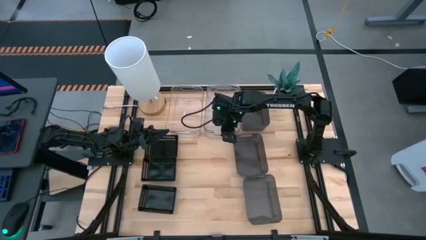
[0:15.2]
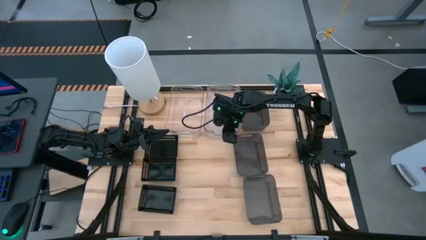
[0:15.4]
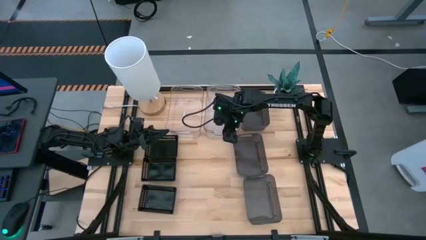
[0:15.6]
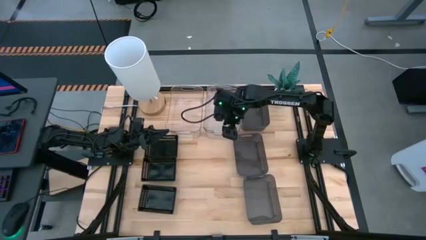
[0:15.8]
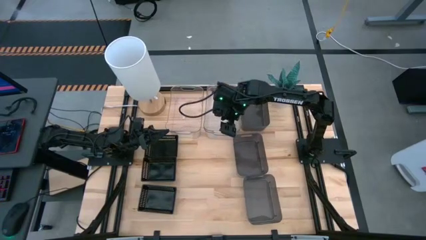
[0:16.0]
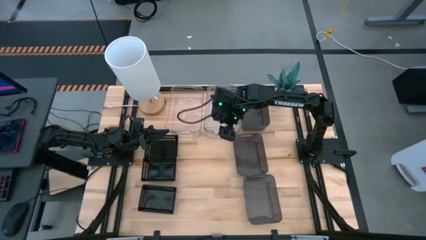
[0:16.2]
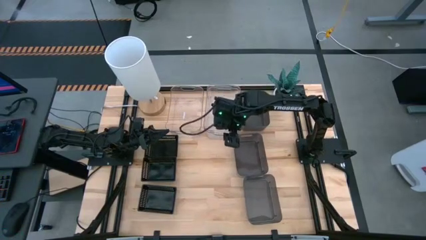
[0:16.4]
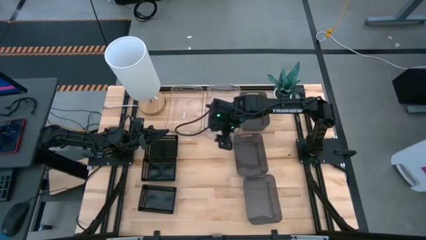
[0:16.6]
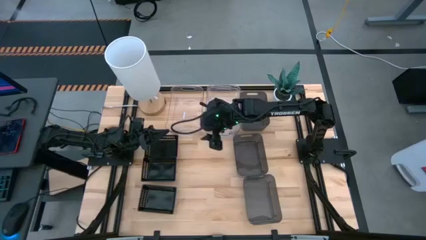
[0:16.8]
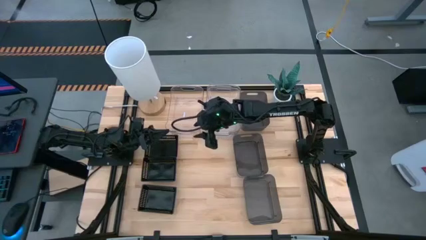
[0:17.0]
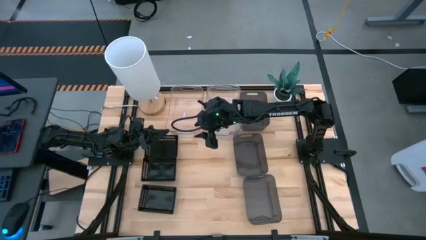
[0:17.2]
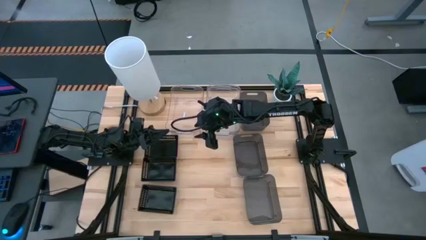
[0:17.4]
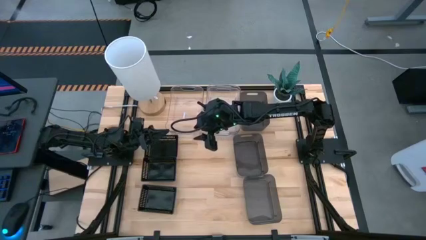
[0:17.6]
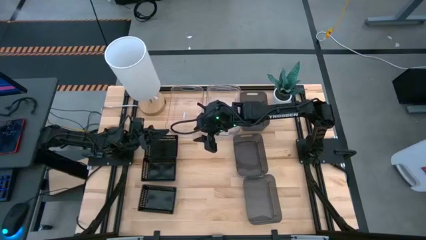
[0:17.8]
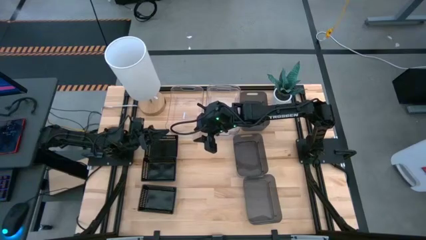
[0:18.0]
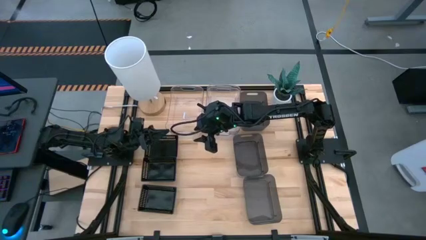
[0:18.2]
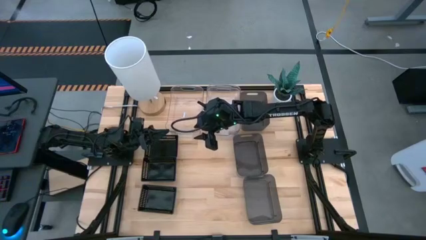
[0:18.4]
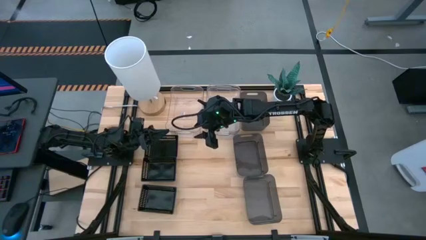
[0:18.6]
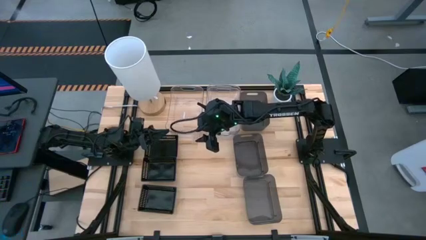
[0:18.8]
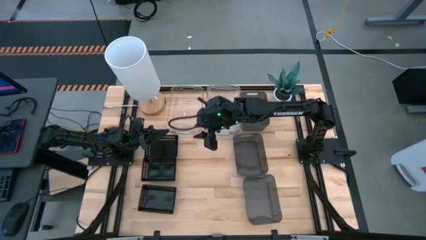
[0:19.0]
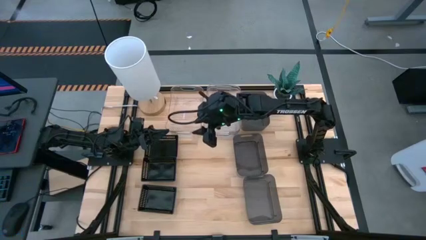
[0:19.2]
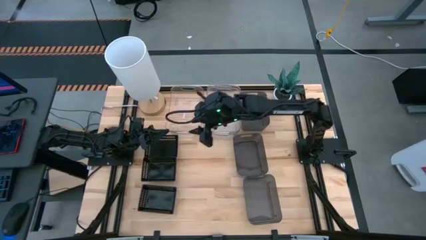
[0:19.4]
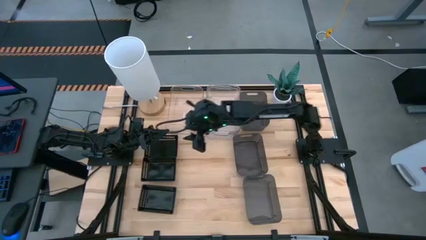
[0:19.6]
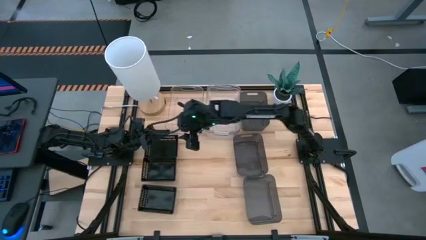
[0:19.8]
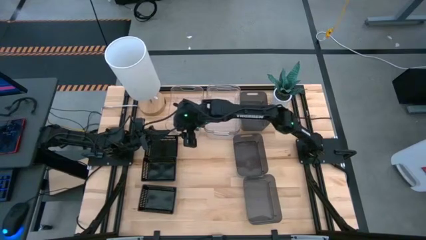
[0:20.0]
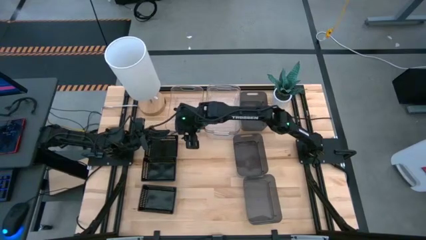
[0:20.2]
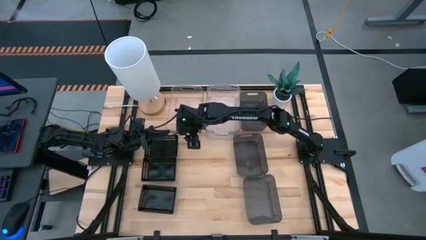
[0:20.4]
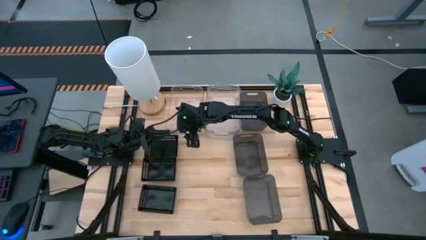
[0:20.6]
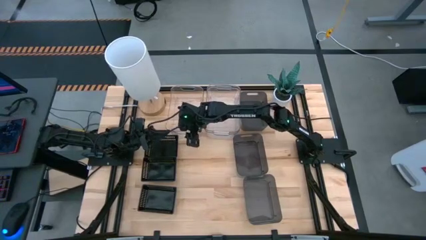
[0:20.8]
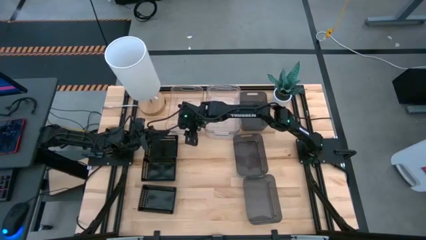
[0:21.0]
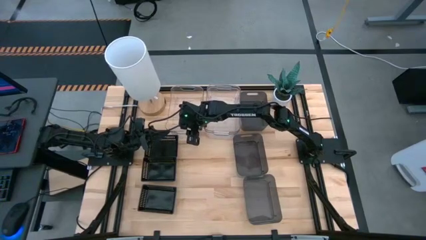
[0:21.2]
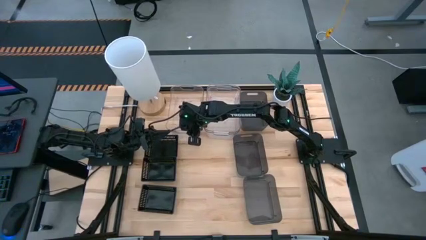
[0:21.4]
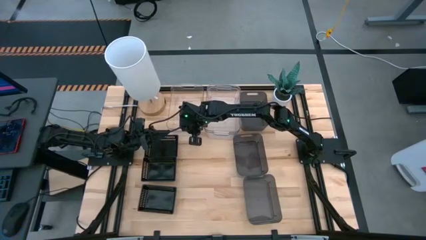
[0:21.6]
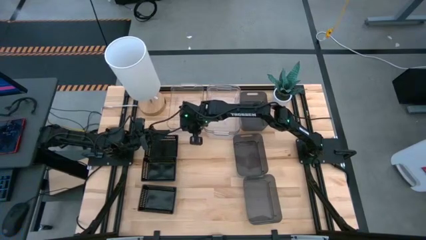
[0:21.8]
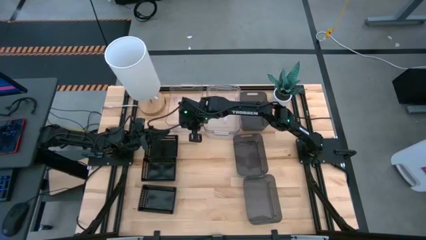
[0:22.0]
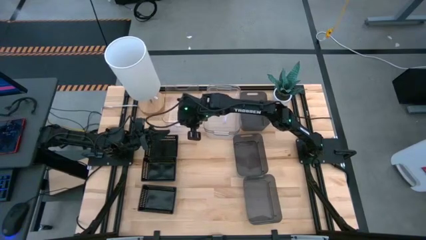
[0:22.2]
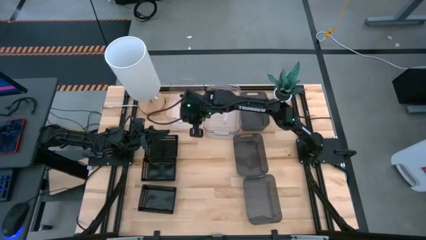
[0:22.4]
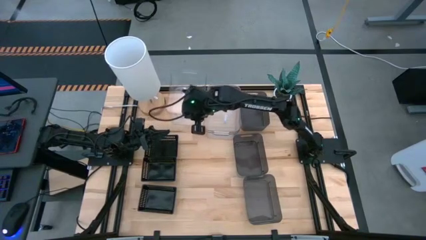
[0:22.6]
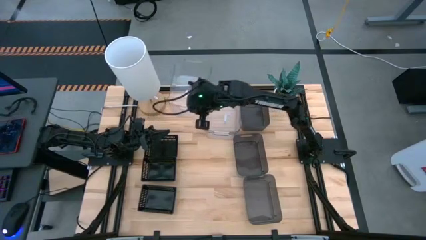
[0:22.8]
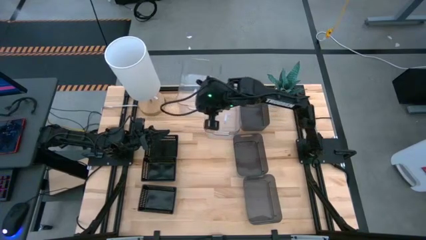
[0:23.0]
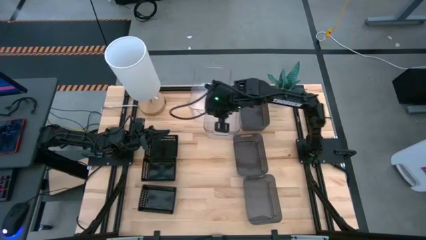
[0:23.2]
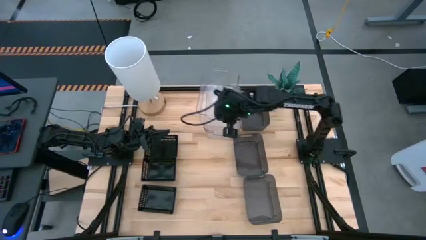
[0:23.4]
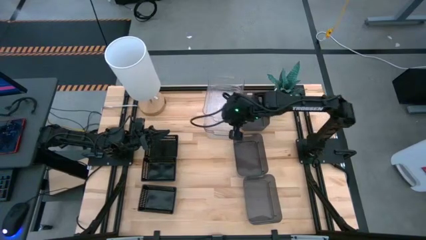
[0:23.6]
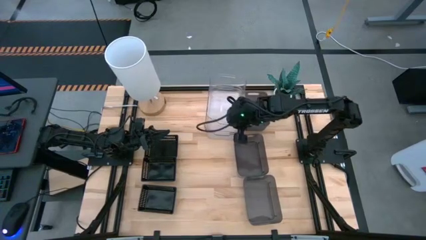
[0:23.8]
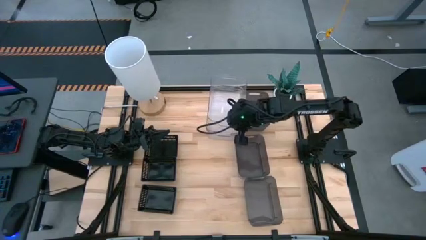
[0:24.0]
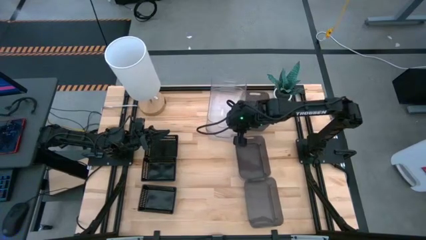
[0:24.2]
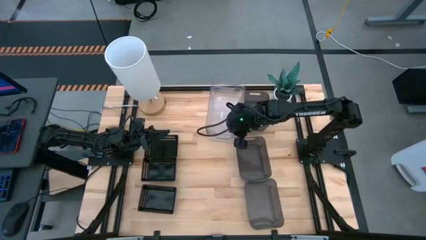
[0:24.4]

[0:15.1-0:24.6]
Stack the left transparent bin on top of the right transparent bins
